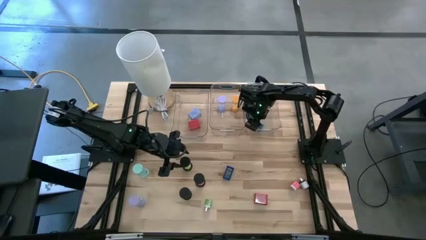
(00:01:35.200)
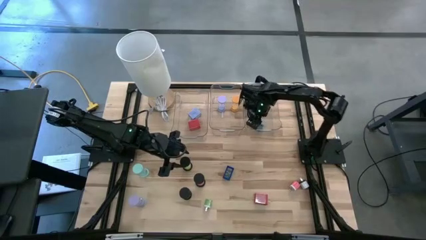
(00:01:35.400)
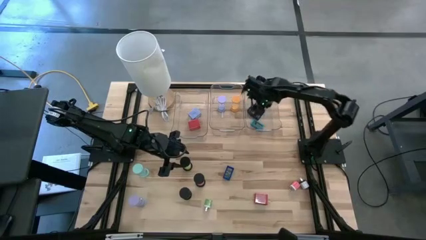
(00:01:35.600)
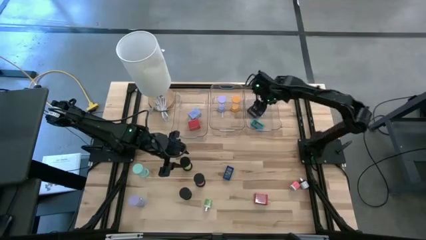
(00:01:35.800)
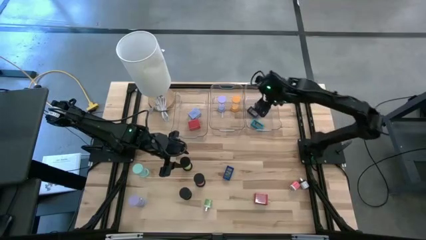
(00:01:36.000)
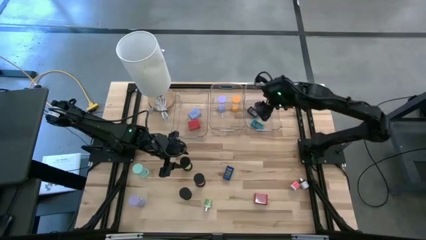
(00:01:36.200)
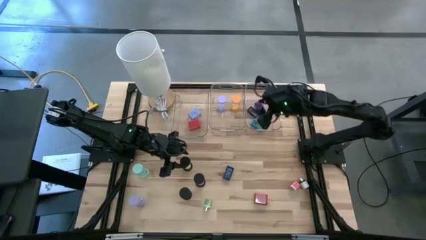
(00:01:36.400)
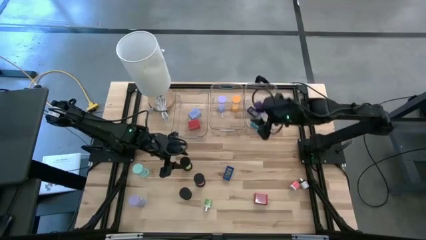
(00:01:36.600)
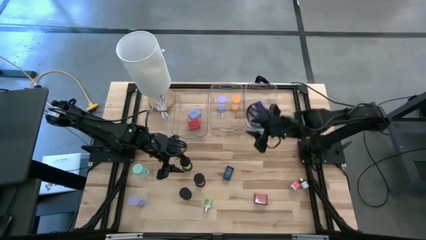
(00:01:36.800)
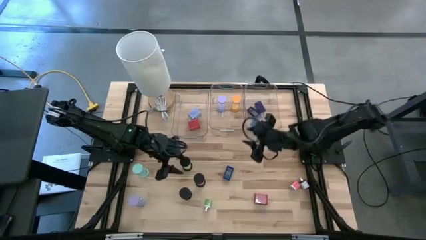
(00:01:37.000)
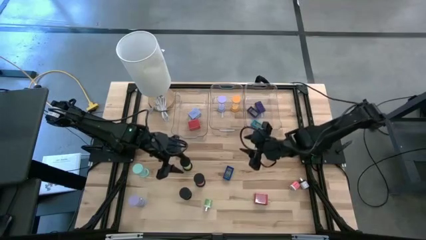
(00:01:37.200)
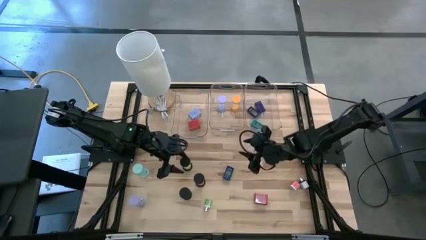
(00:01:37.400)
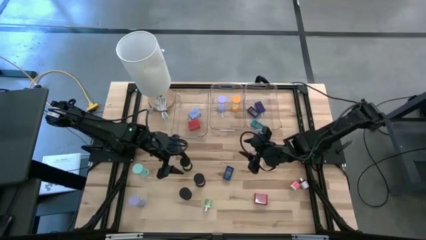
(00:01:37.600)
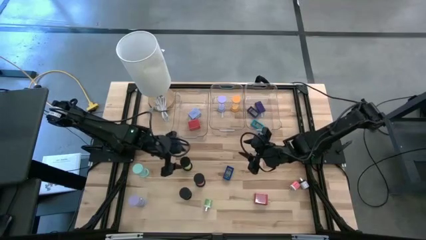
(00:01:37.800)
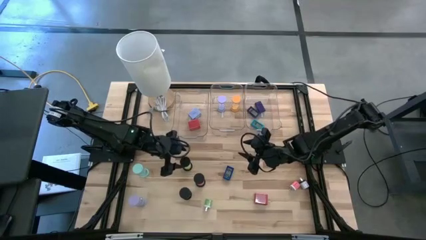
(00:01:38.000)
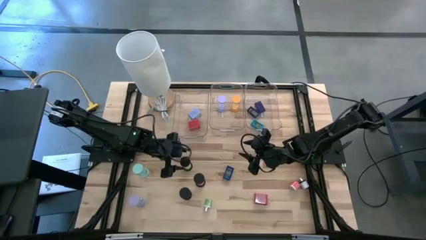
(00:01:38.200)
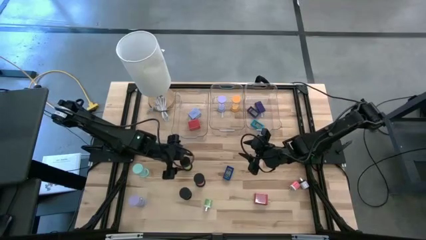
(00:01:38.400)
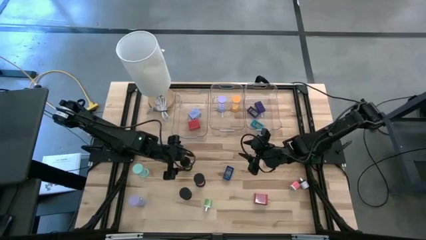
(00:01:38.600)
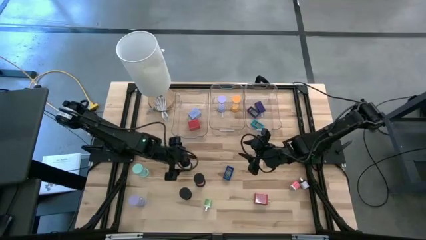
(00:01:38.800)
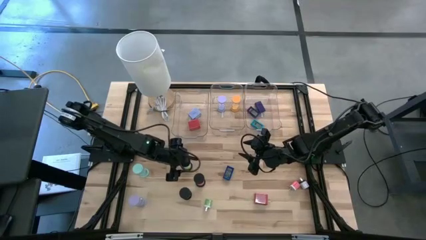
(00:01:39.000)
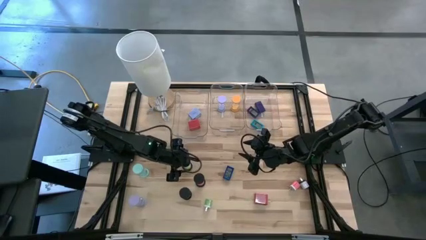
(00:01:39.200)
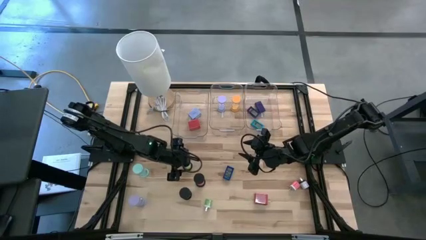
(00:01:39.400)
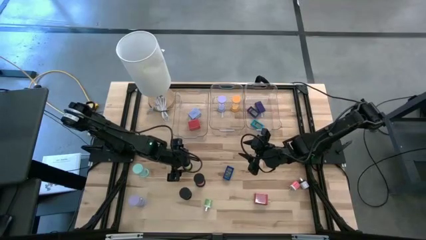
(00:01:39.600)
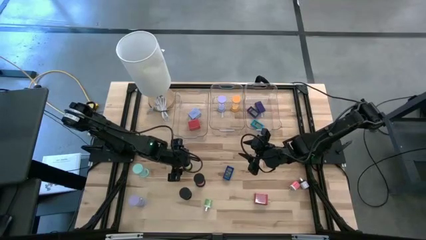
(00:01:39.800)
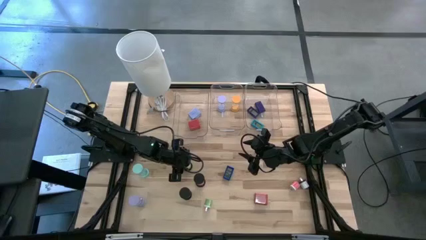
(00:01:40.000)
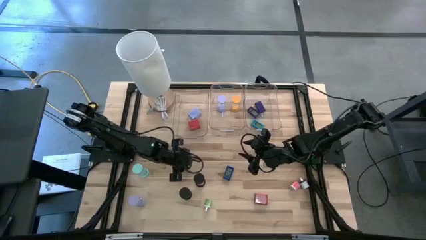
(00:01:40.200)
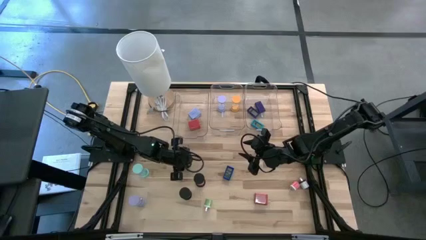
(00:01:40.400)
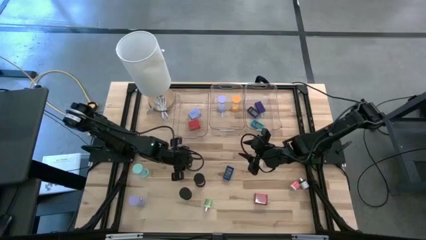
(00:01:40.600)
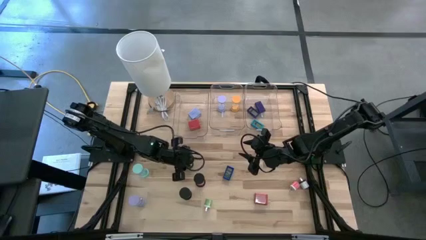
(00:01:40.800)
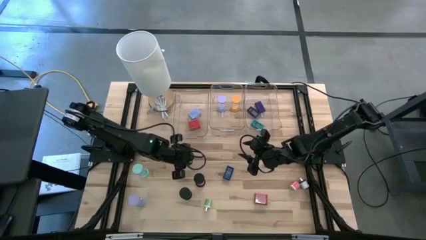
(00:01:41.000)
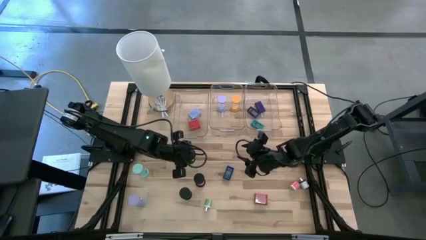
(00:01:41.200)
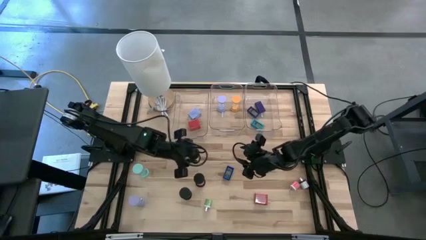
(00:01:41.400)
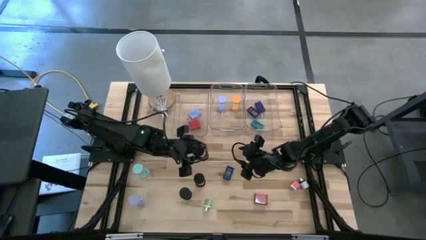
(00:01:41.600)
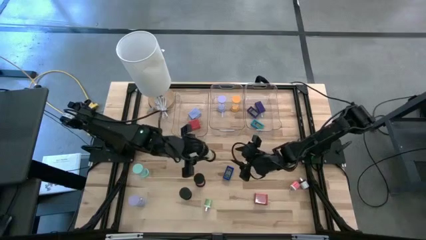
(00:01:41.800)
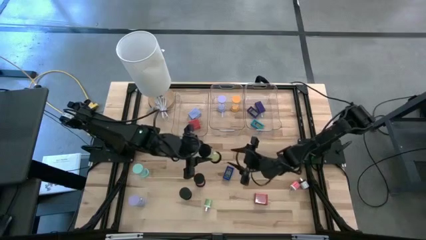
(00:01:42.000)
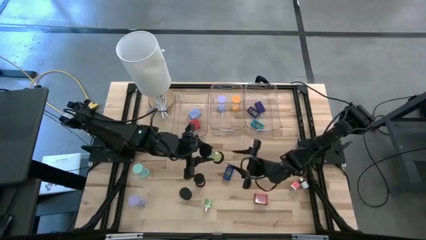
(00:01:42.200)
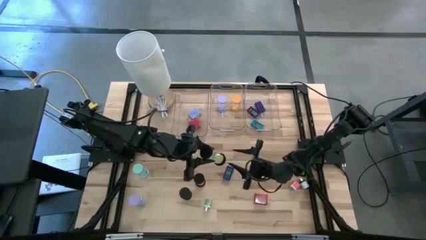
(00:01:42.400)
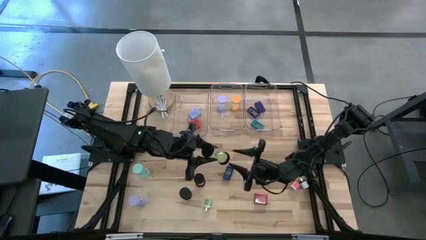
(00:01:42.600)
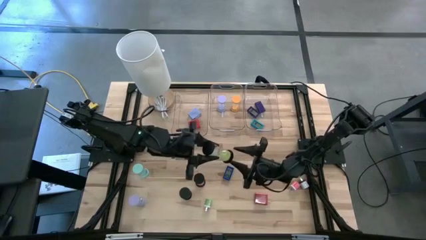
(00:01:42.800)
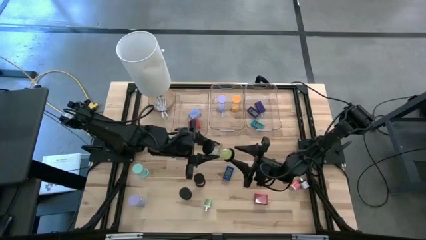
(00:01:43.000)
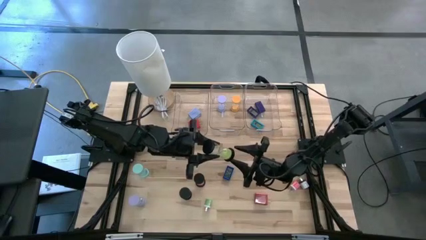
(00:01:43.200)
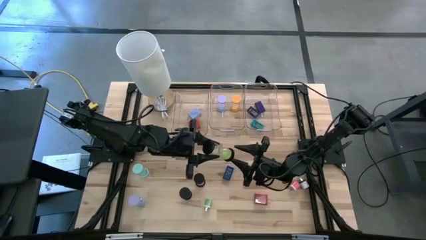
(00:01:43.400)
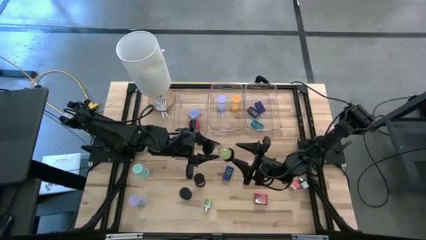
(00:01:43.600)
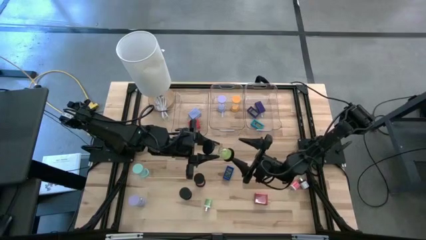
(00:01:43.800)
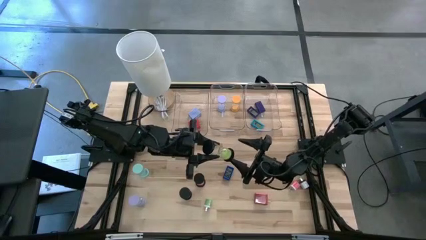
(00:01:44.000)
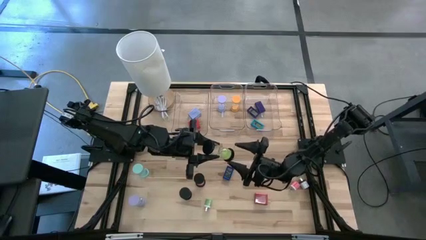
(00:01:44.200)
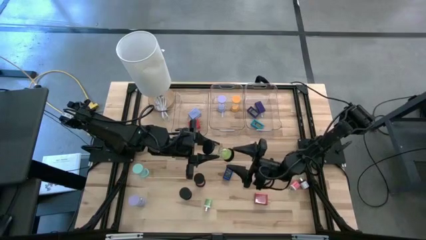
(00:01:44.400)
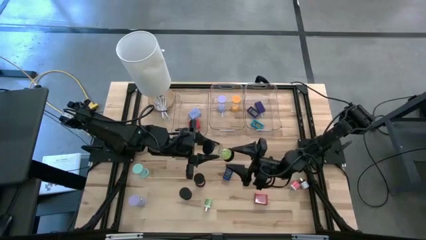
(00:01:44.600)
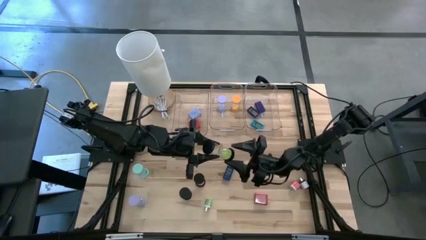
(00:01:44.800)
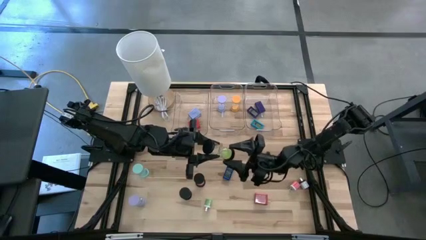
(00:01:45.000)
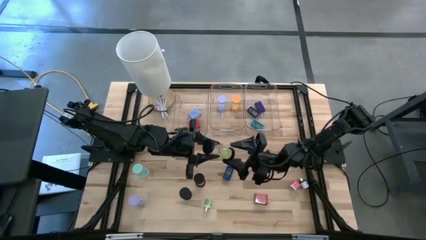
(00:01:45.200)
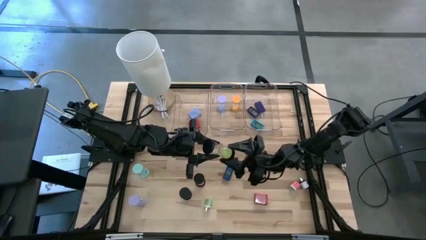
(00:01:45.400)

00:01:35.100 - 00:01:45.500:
Task: Pick & Place Office items
Put the green hourglass into the middle transparent bin
